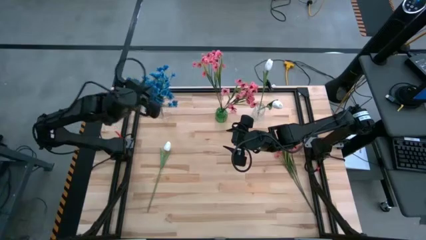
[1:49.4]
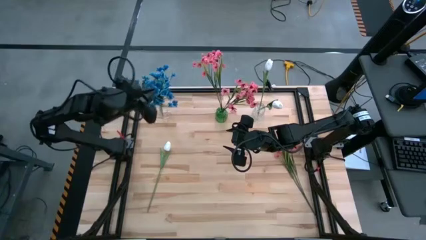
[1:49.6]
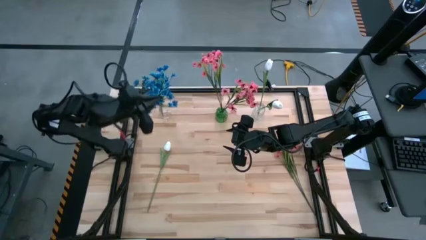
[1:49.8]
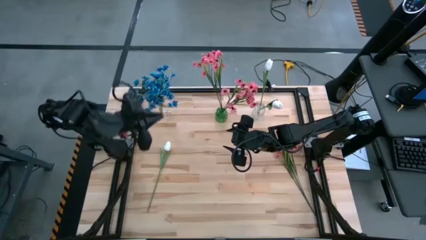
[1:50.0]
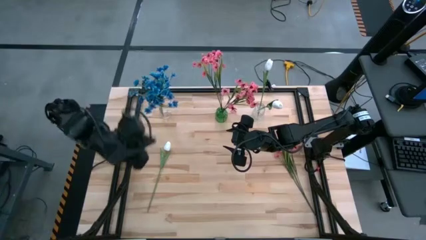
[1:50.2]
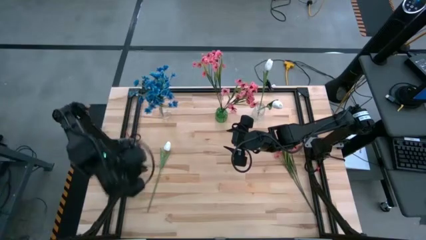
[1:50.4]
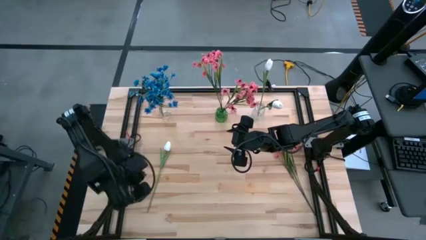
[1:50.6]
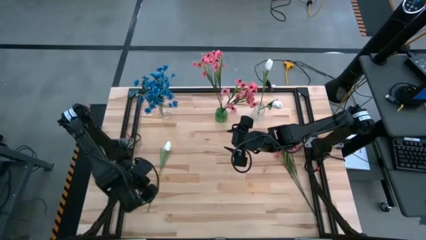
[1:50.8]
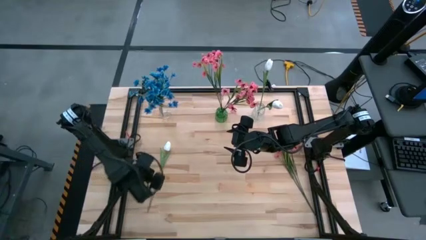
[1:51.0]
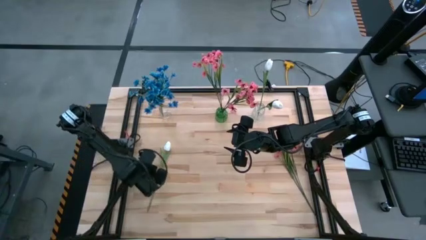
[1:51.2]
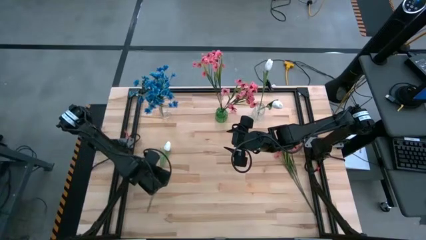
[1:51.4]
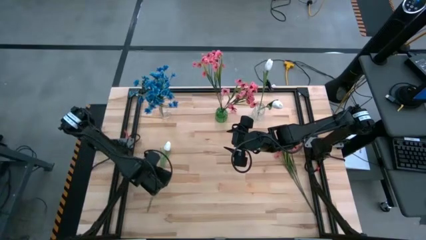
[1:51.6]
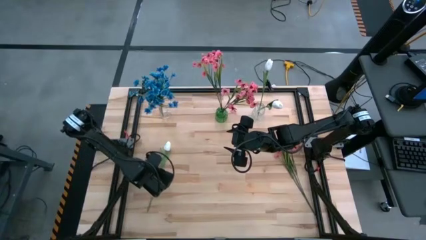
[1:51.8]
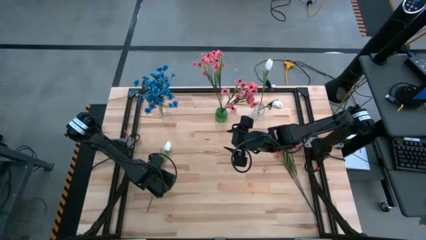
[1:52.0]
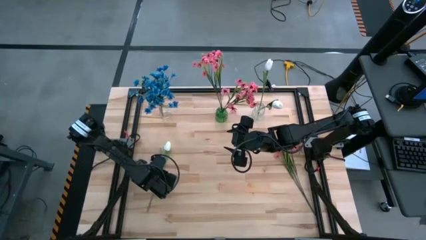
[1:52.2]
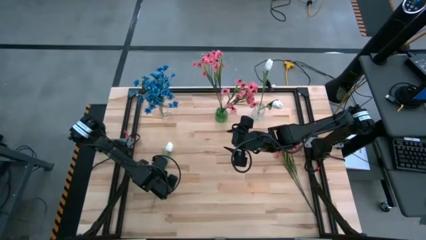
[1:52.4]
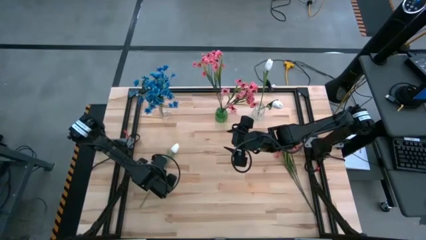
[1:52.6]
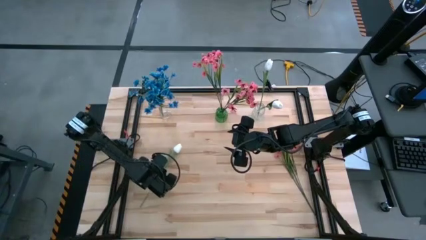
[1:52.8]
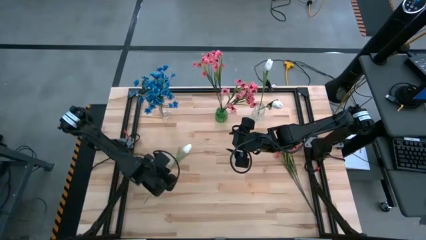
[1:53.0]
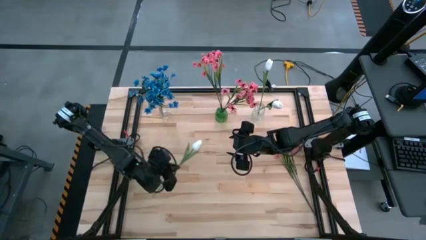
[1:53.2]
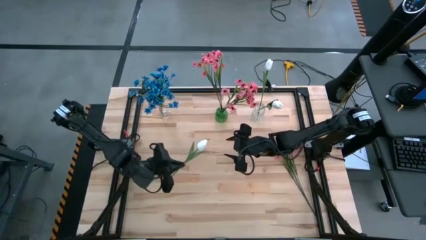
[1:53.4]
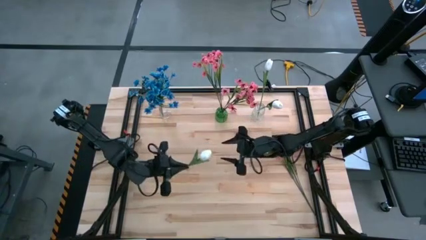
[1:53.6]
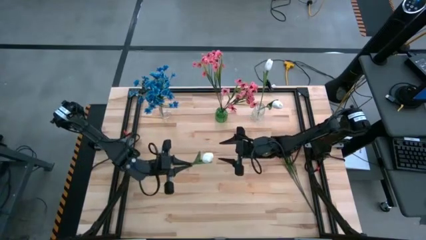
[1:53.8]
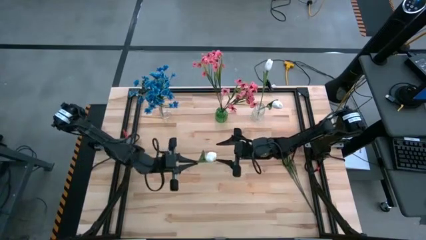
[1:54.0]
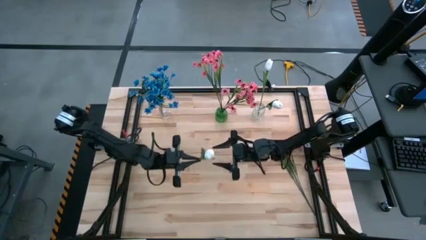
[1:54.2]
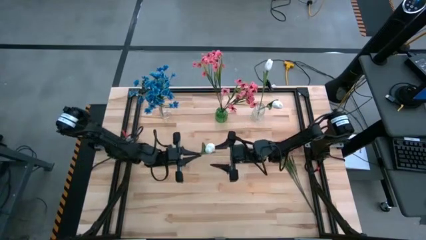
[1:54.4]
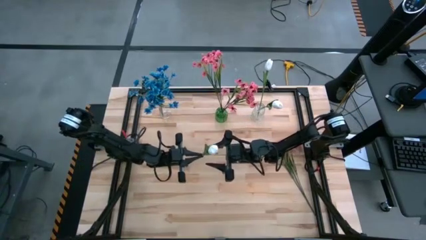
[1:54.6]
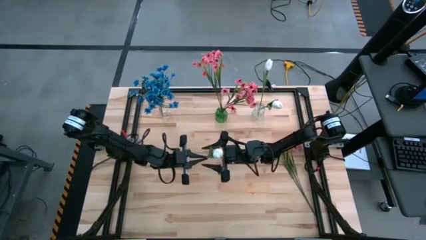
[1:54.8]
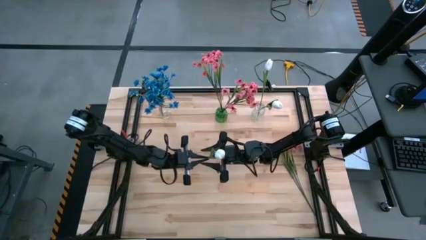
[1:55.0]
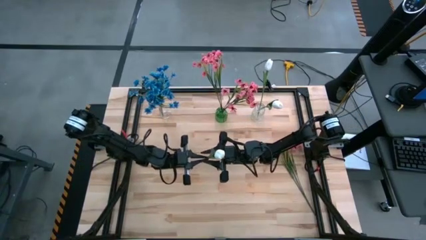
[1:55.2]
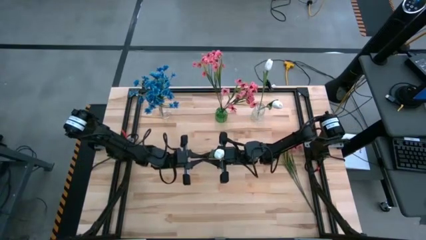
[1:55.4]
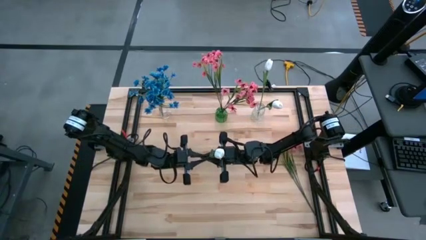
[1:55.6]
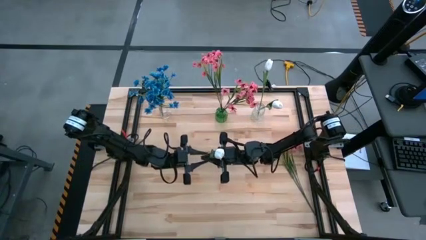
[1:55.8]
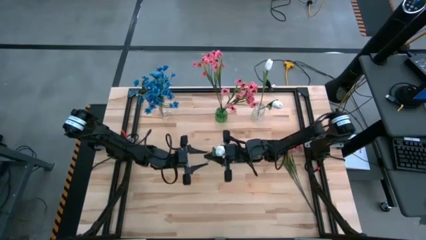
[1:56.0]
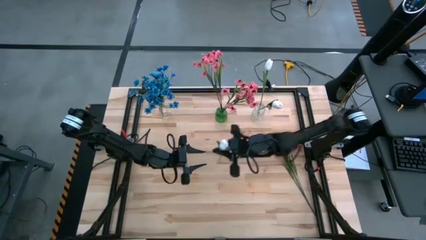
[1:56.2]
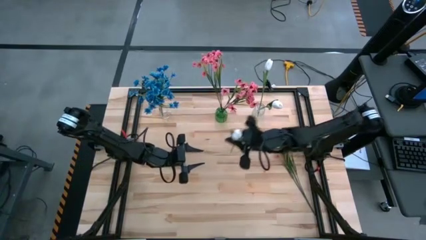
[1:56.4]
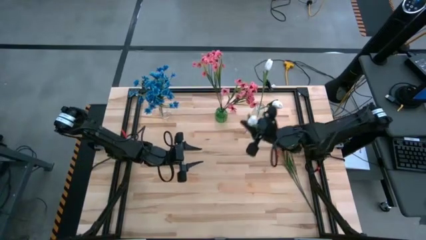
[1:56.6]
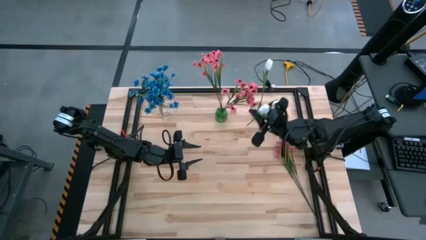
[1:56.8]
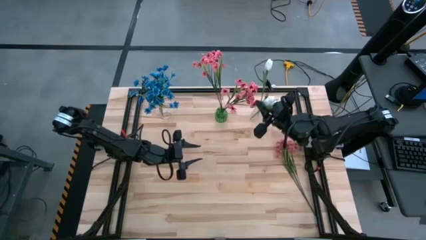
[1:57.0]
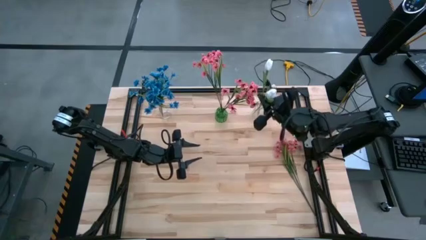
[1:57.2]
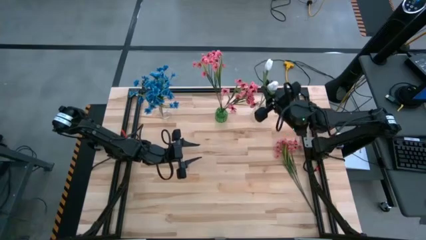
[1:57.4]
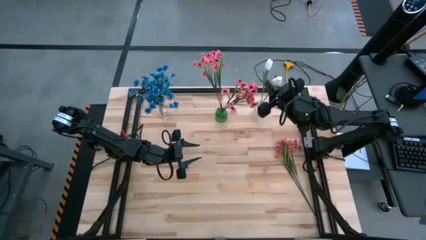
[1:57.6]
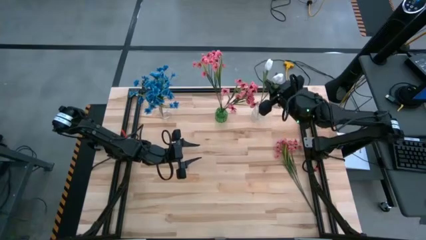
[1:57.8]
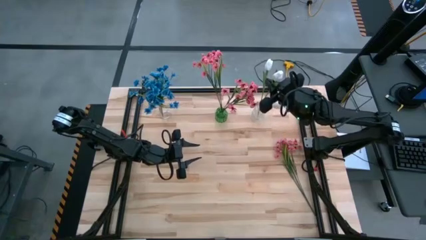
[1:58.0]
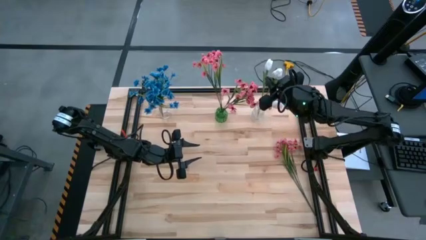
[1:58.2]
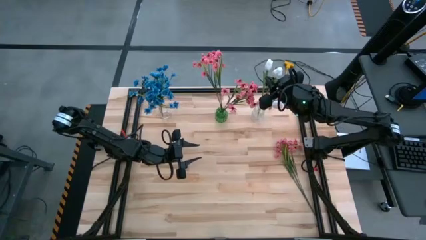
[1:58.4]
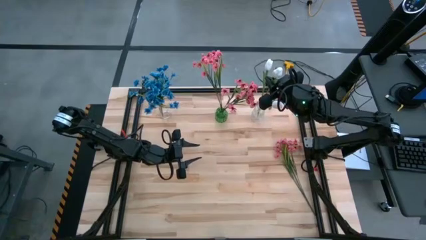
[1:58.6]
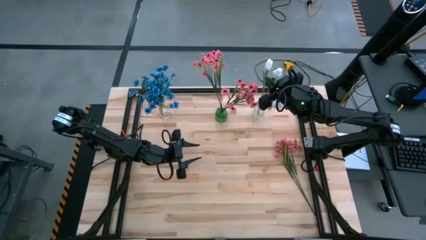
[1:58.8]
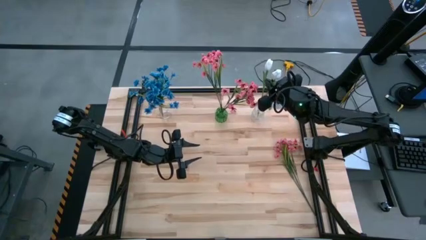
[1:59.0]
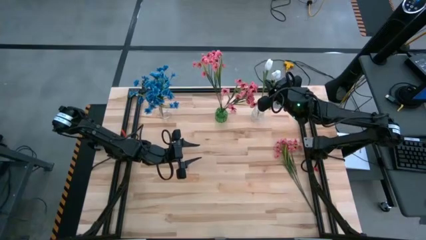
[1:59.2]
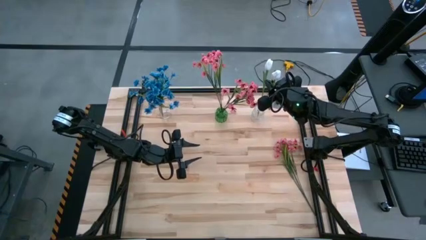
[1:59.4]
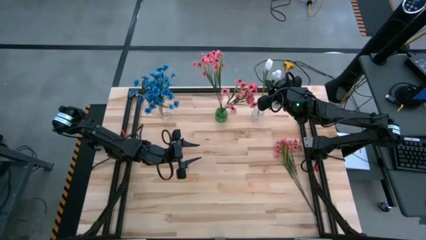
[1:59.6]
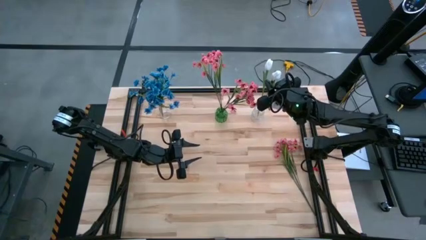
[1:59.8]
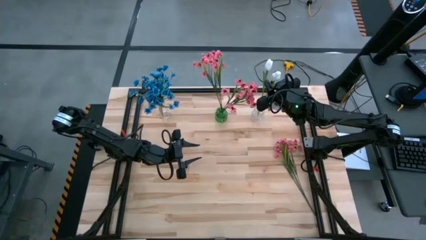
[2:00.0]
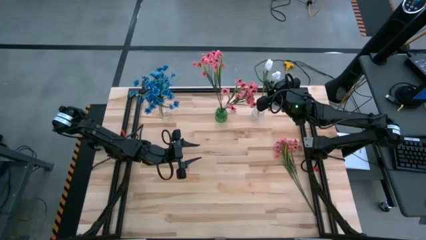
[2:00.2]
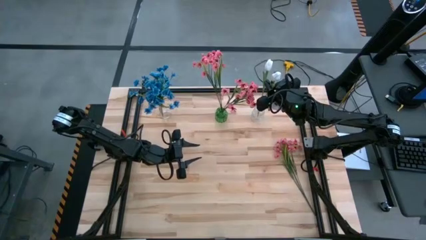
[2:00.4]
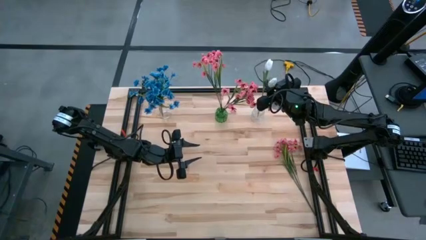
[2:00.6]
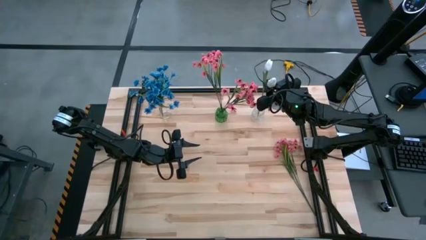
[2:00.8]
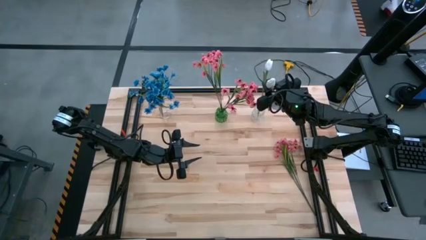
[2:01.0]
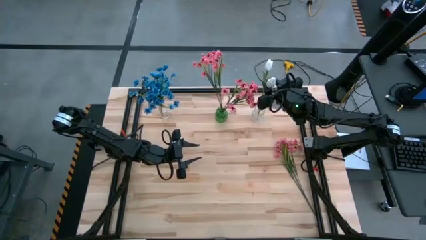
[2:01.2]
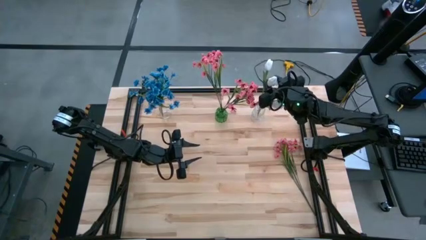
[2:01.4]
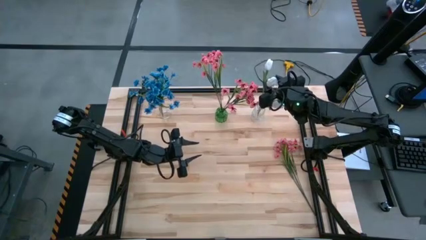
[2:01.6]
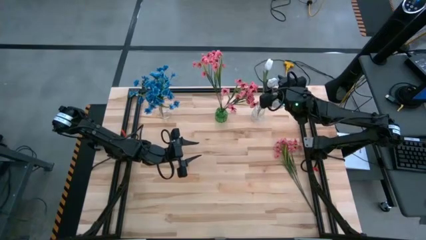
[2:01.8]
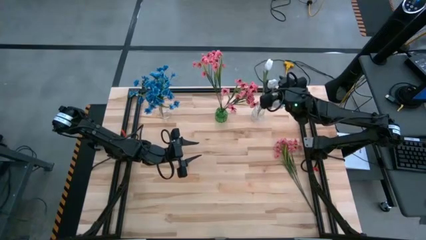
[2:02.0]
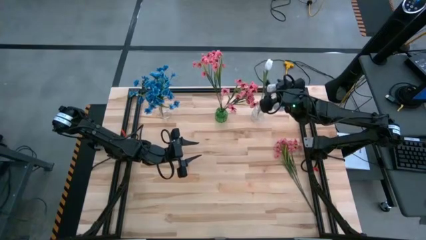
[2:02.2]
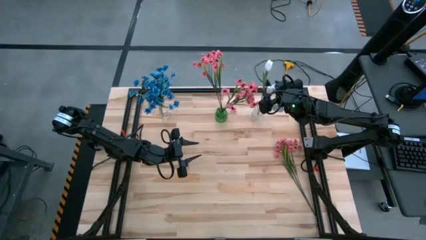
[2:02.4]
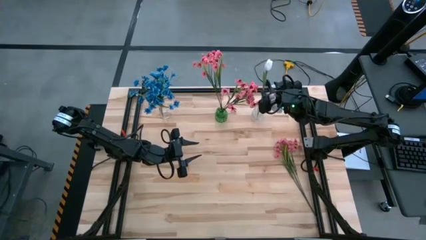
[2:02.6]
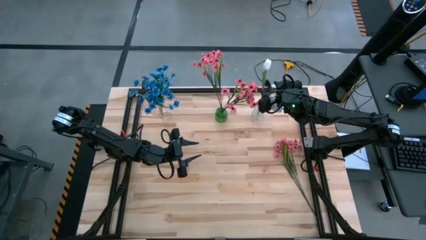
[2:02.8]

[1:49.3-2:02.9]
Task: Sort flowers into vase by color
Put the white flower into the right transparent vase
